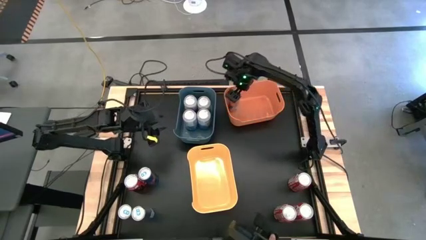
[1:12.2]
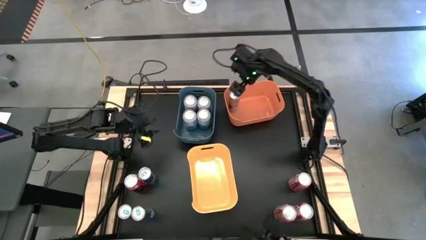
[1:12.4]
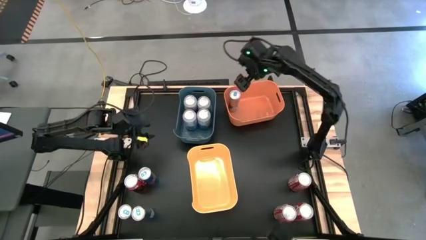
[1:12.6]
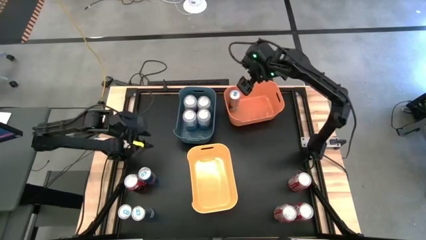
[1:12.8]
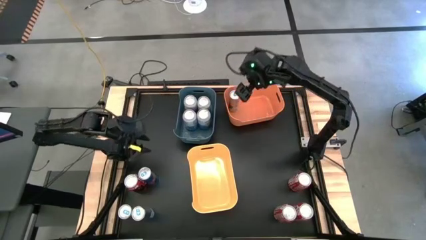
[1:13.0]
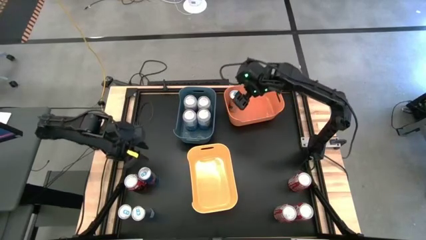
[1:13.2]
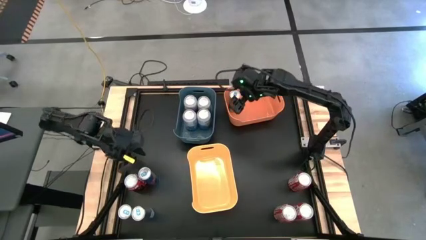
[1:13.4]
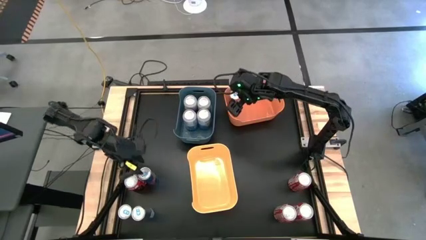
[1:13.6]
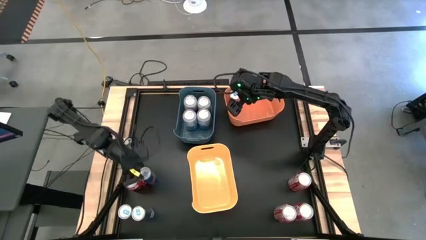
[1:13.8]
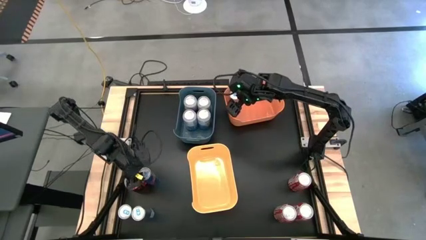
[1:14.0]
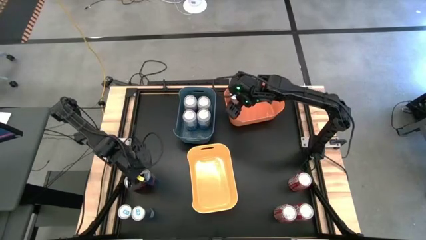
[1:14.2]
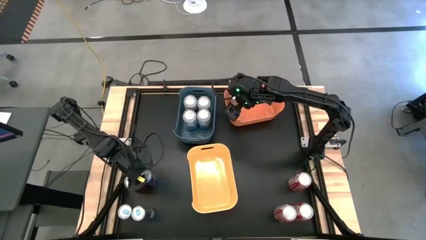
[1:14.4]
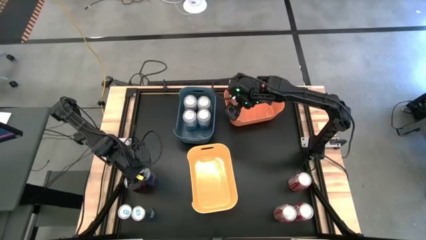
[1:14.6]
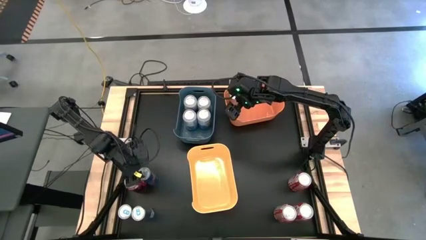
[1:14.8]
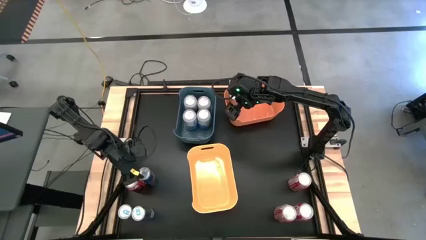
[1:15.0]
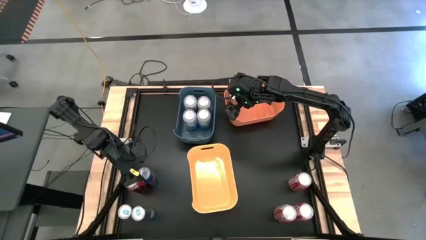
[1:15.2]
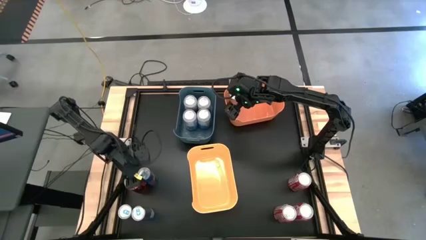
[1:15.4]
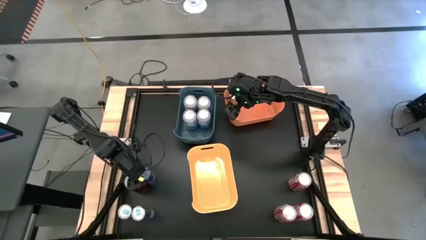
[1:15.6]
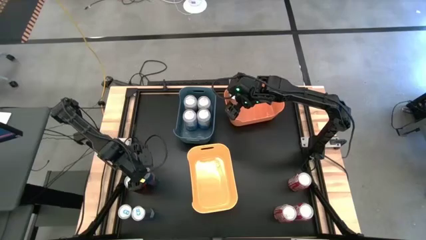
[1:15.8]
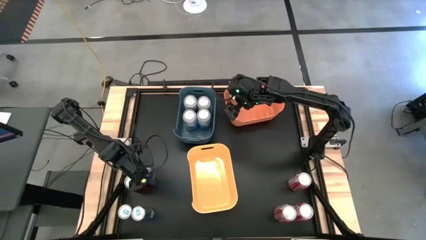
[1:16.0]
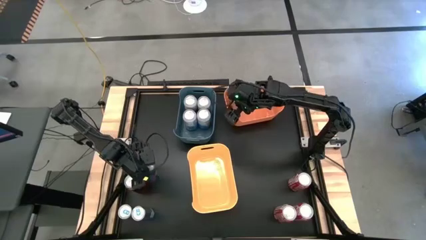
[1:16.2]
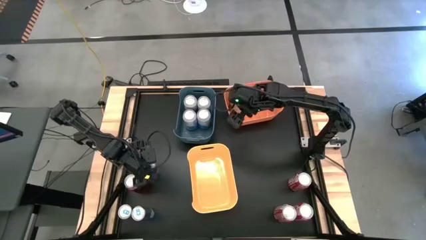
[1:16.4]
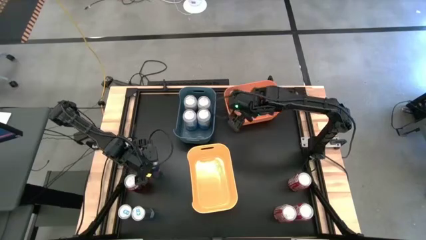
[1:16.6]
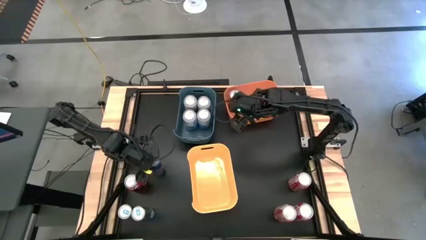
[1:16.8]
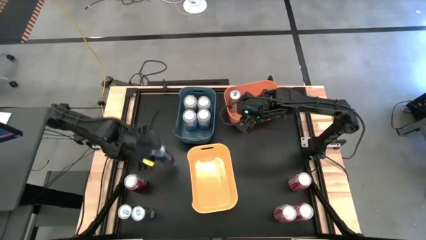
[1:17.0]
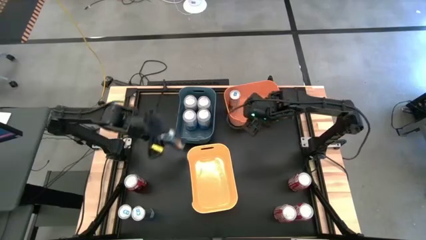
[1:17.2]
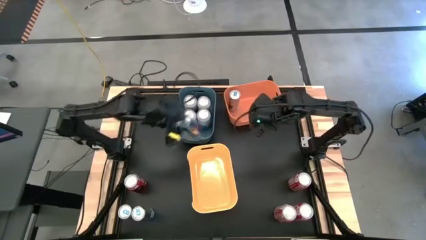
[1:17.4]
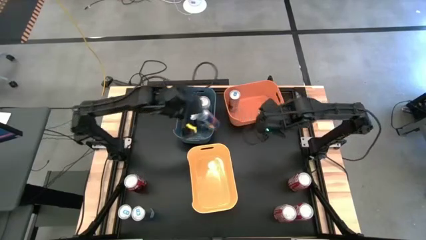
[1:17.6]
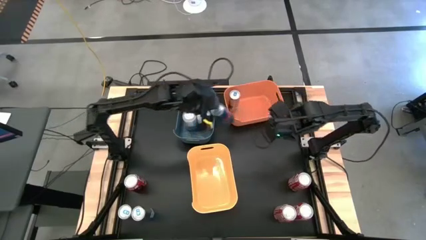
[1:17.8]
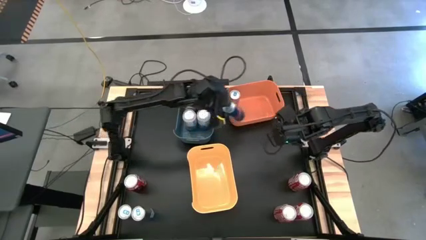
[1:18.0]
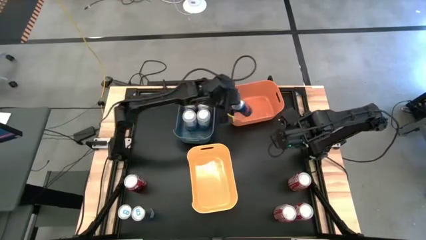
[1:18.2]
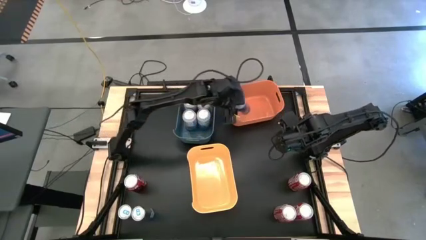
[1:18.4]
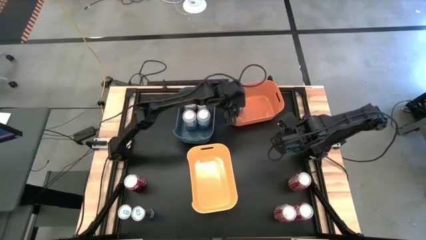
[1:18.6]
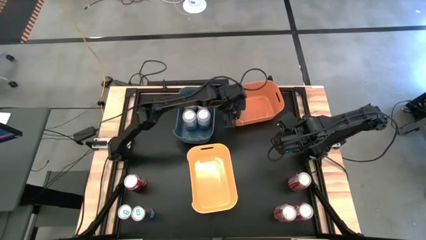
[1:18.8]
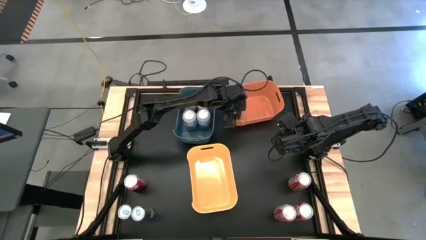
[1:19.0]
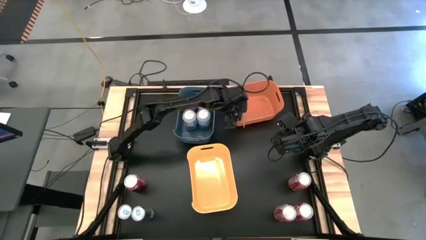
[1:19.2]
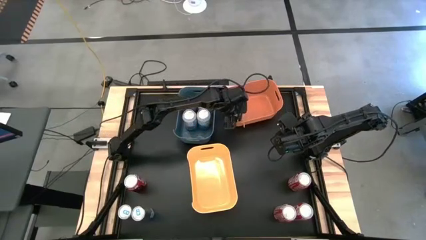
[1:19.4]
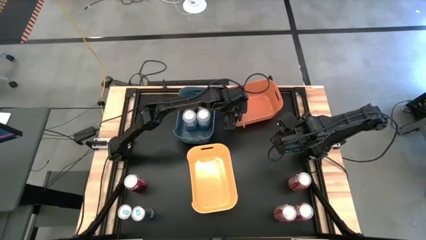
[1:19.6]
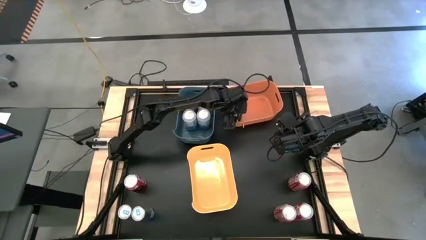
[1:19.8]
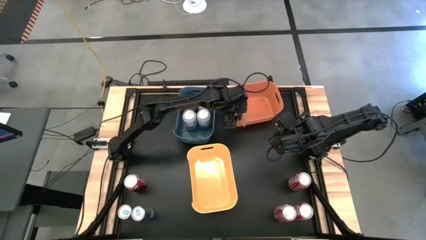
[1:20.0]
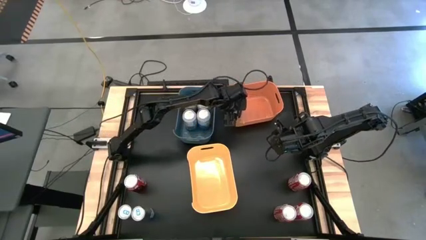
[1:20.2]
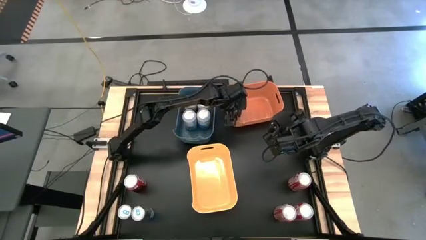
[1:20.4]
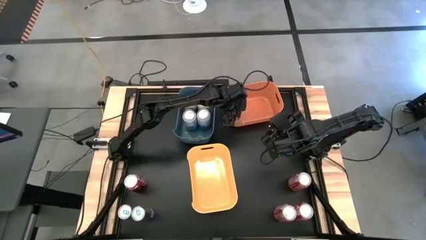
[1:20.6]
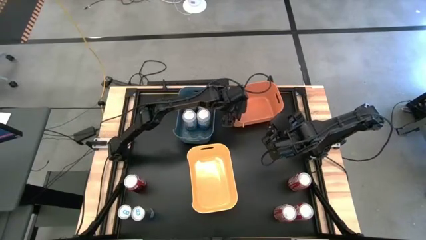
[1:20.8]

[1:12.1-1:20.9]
Task: Sort soda cans
Put the top blue soda can into the orange bin

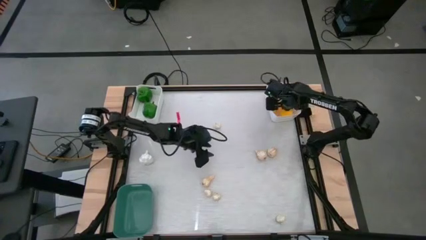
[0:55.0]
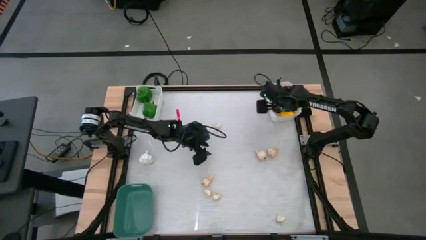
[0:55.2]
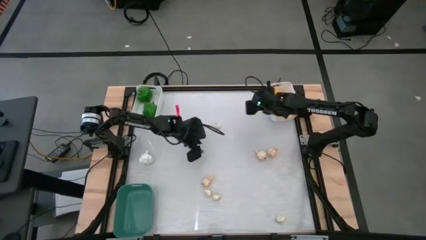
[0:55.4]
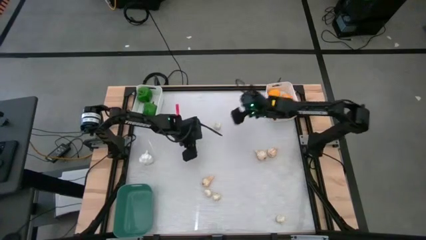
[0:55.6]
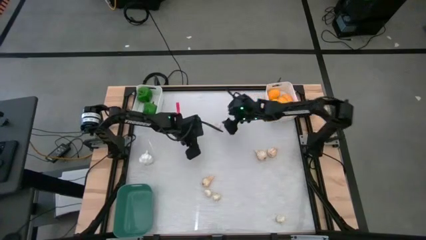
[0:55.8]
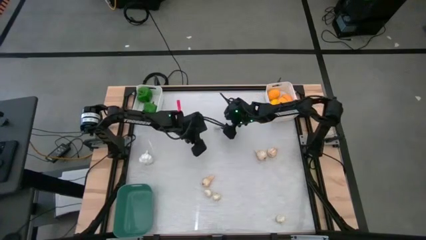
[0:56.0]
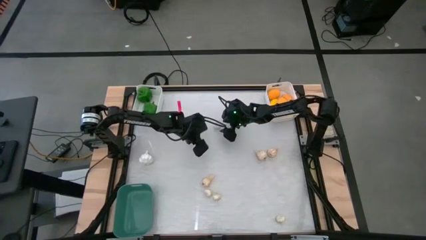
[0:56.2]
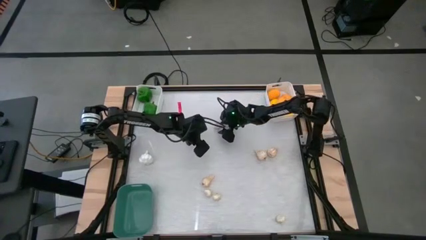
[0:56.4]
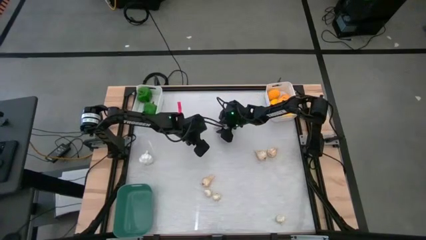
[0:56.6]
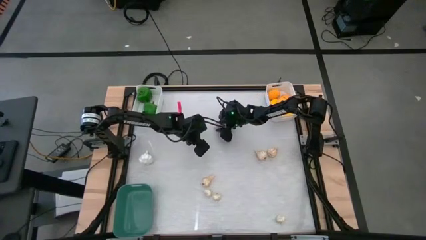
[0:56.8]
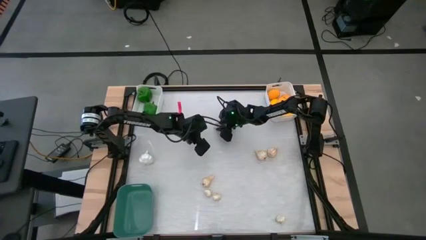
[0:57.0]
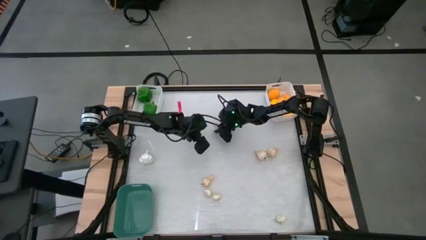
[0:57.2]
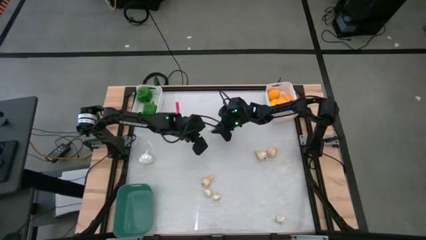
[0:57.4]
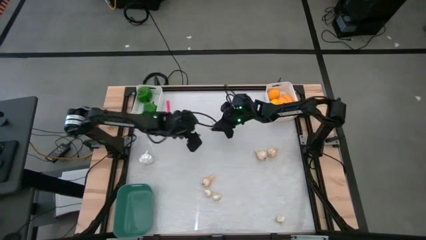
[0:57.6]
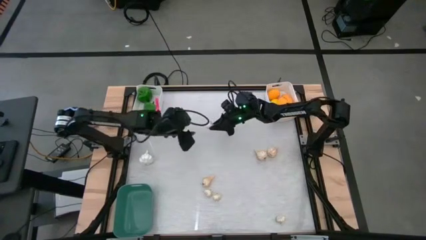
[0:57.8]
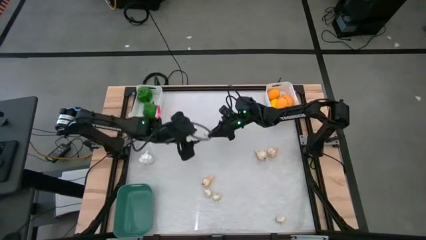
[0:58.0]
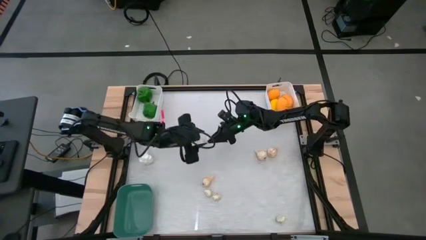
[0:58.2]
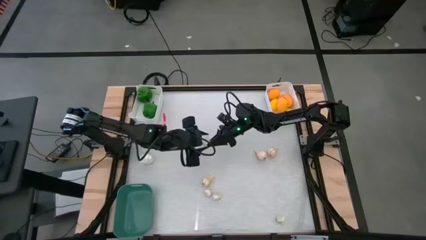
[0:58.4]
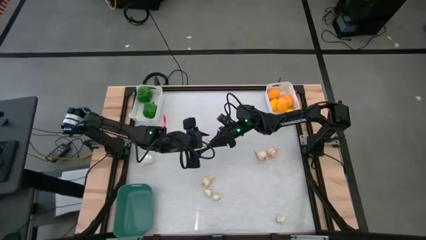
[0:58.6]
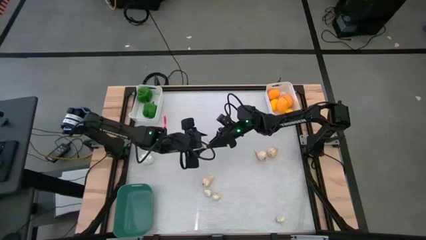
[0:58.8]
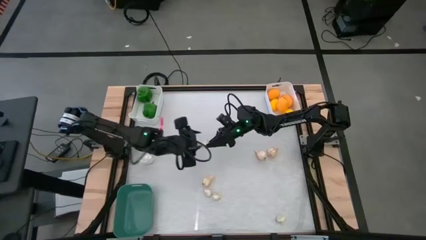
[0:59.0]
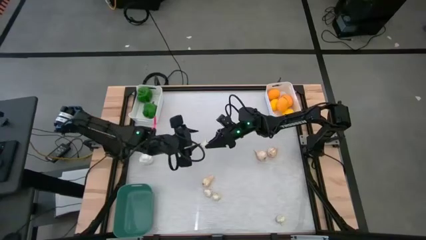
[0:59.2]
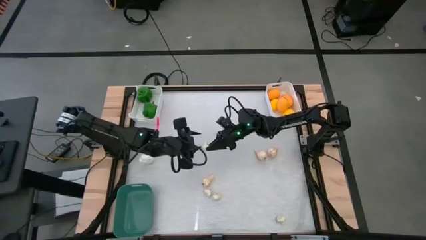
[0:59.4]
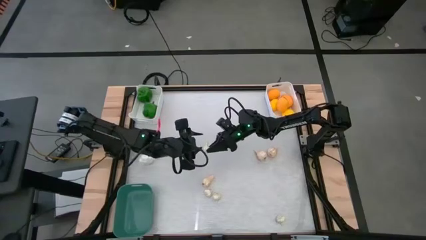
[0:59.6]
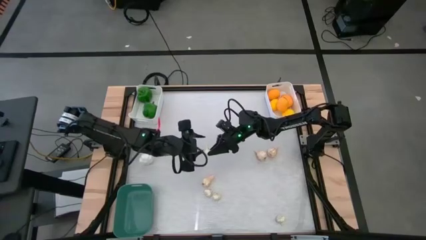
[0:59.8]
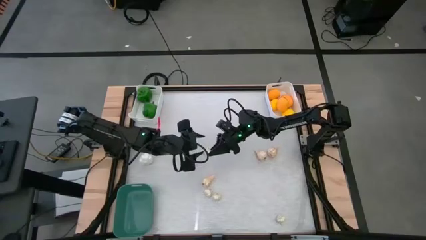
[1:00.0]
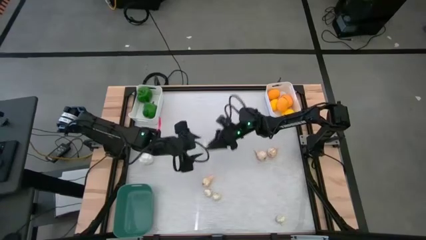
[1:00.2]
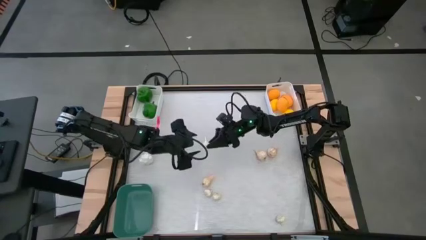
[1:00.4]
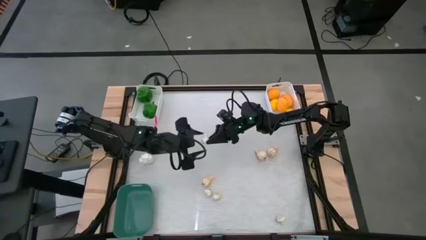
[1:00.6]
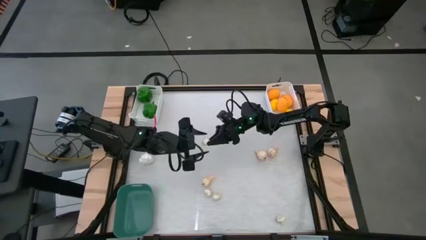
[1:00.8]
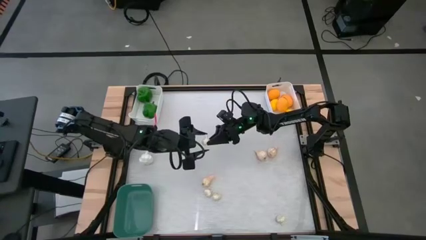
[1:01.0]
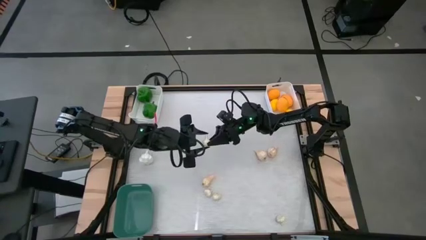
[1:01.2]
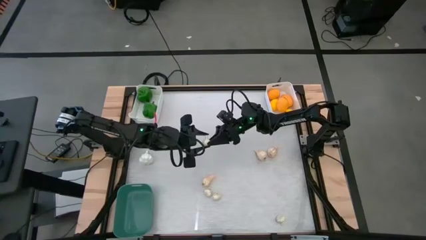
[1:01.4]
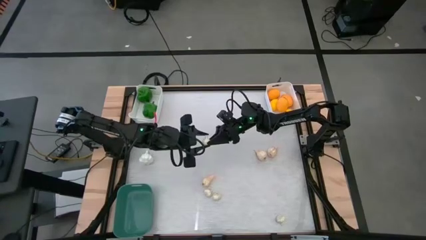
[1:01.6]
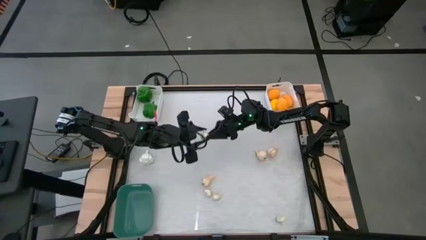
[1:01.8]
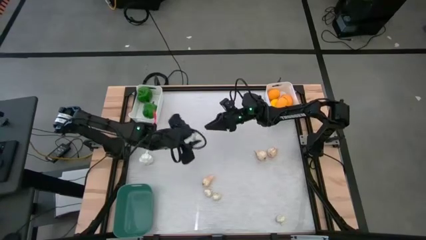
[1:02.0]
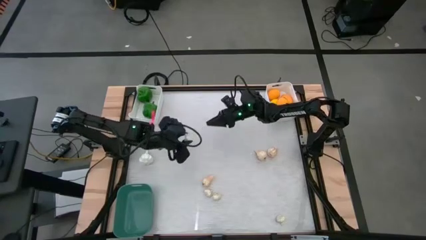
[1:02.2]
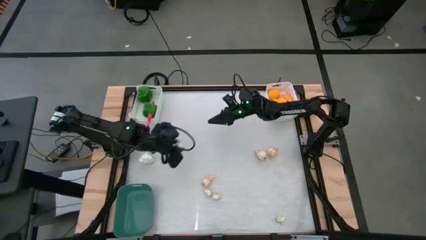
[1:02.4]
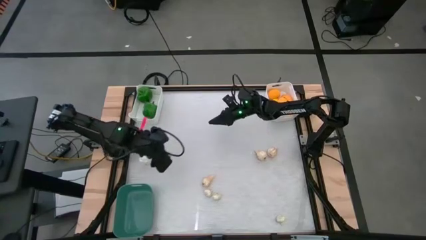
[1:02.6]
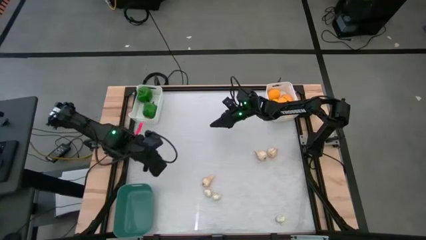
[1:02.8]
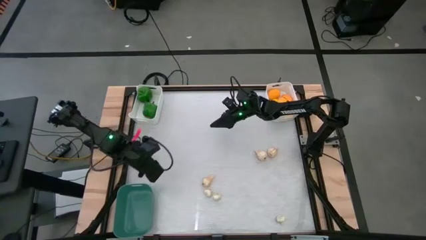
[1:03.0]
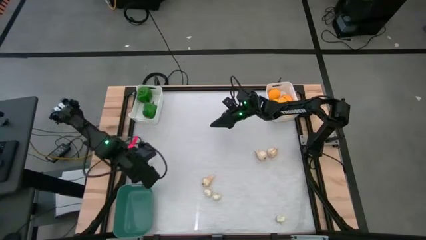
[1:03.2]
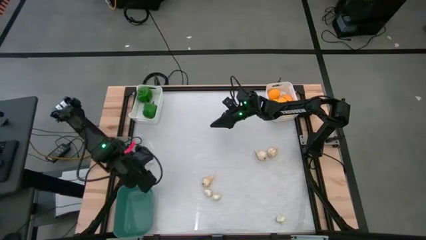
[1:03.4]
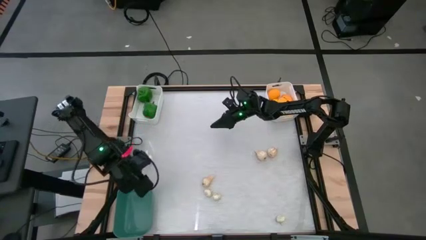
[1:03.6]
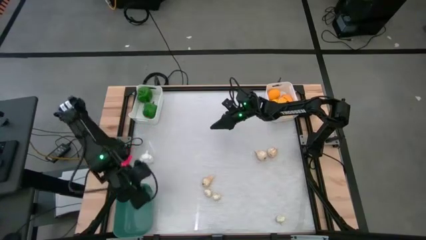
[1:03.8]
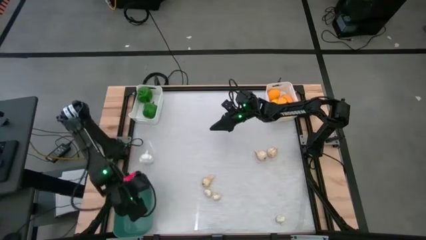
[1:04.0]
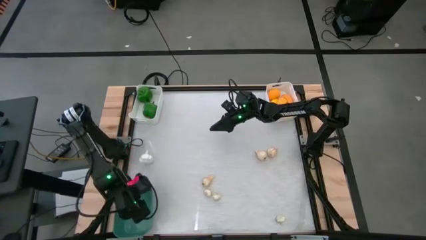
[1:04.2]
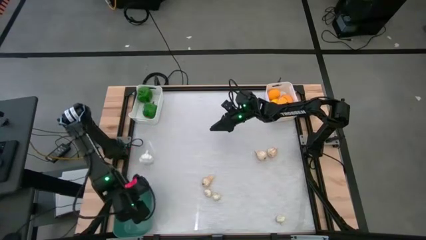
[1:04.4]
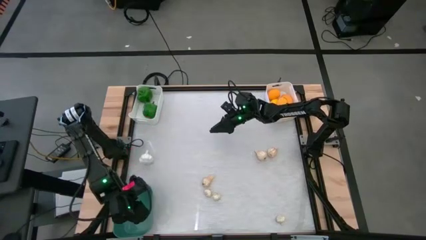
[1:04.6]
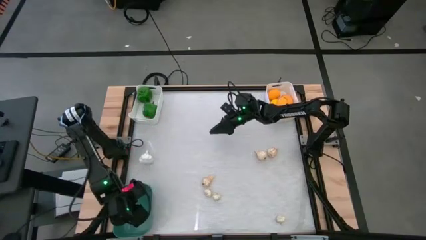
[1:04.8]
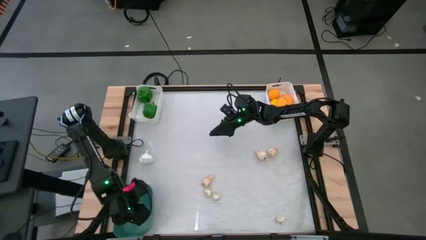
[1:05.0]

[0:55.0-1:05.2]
Task: Sort produce into baskets
Put the white garlic into the green bin
